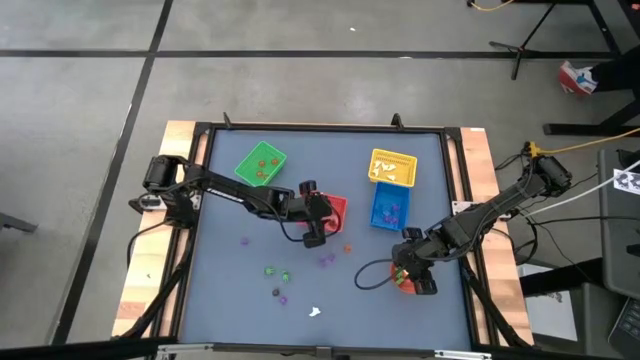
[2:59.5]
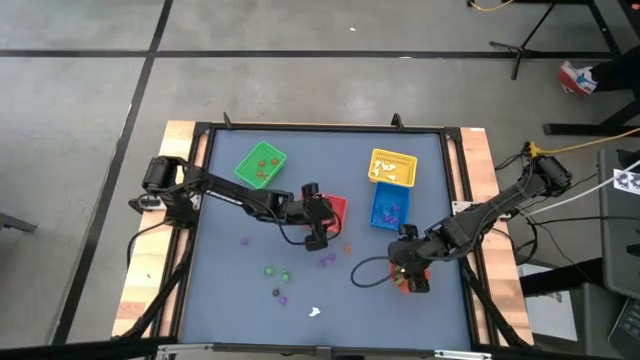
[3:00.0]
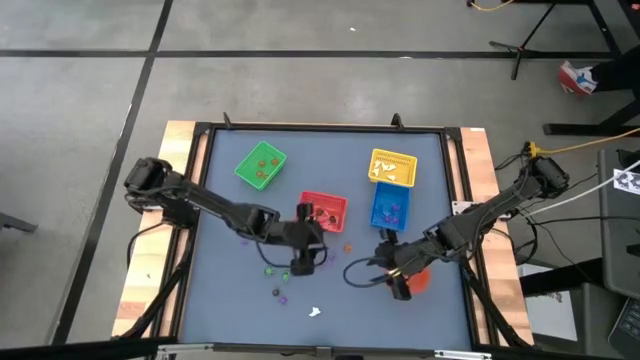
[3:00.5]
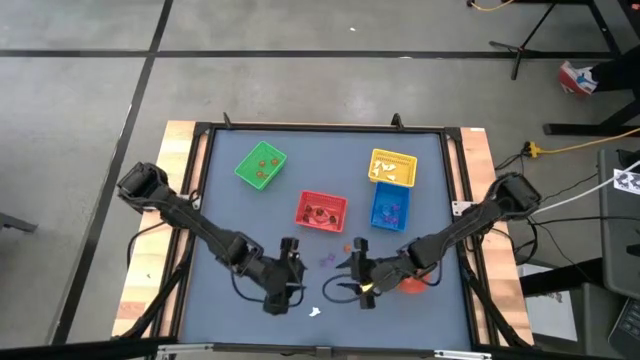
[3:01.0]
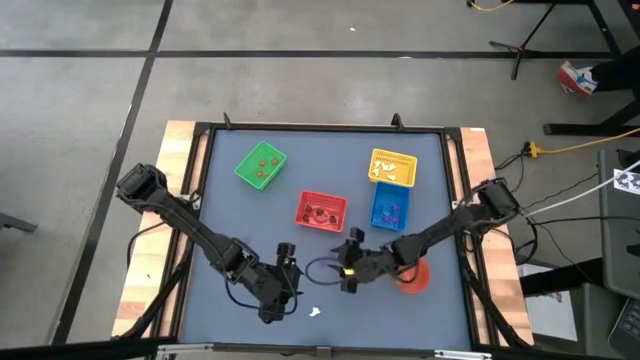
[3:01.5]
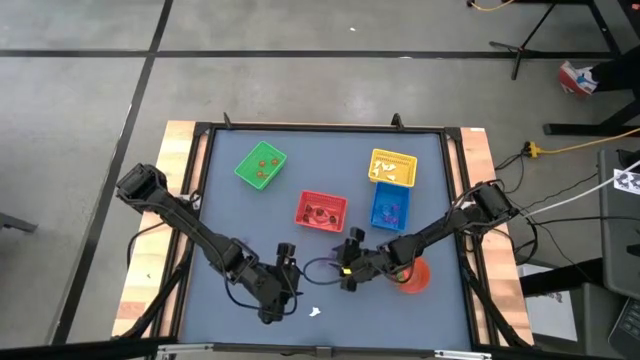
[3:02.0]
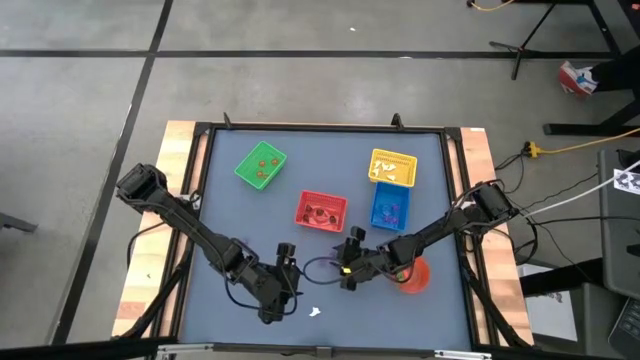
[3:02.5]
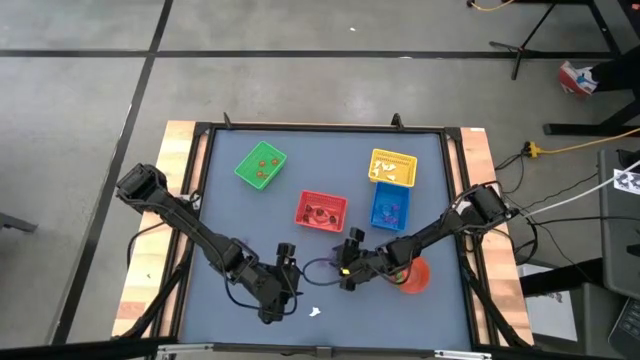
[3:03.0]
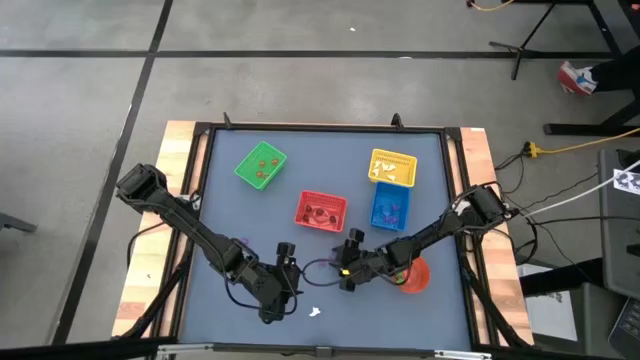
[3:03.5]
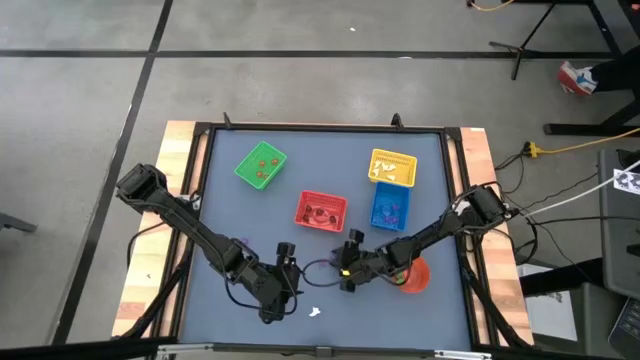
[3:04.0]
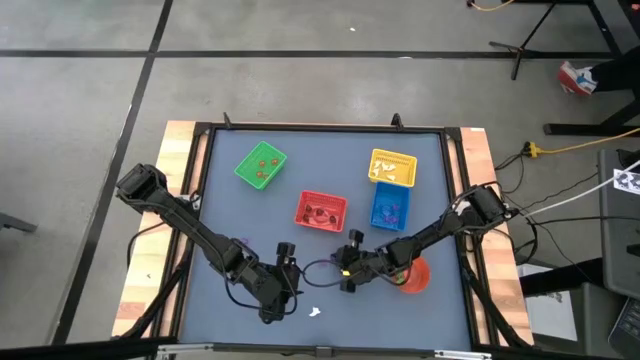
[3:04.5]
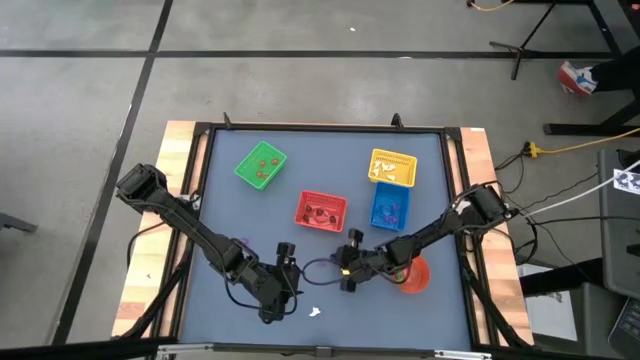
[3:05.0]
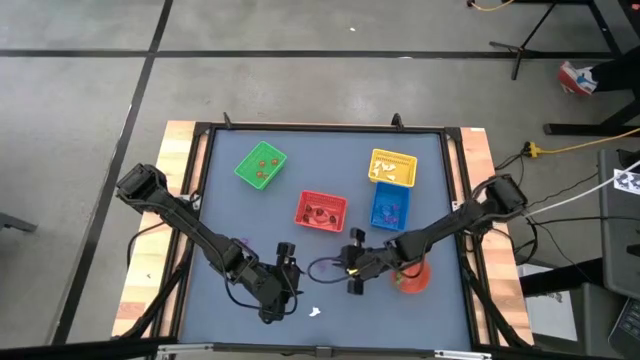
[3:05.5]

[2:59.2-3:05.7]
Task: Sort Halloween decoration
Put the violet spider toy into the blue bin

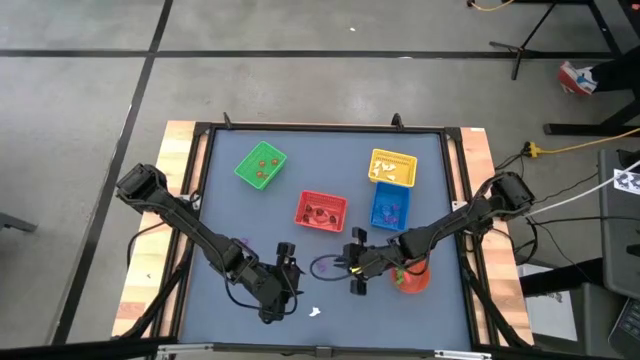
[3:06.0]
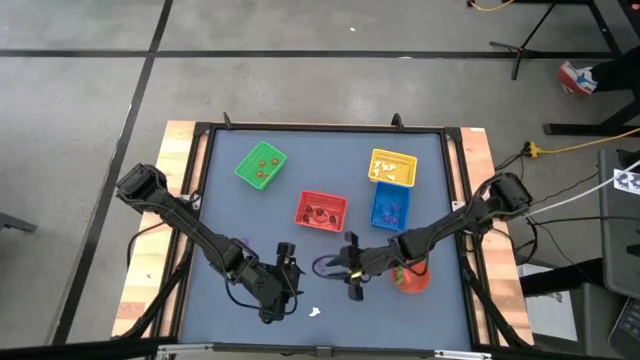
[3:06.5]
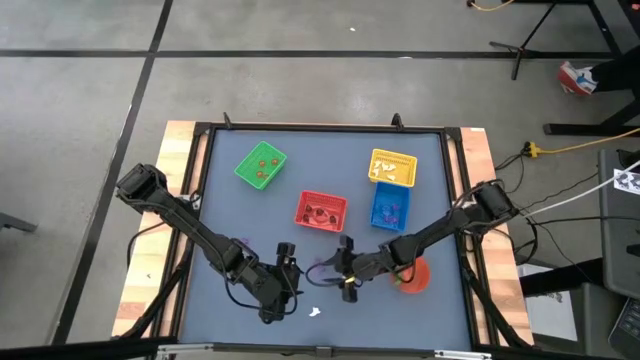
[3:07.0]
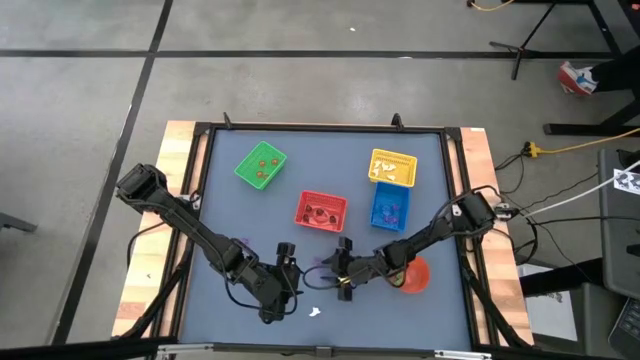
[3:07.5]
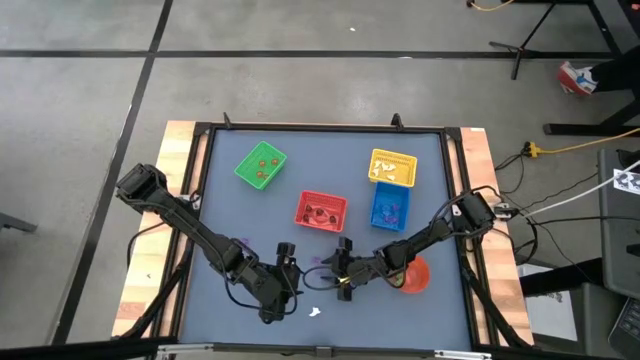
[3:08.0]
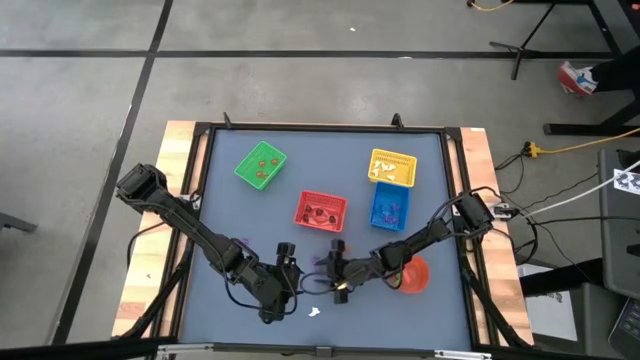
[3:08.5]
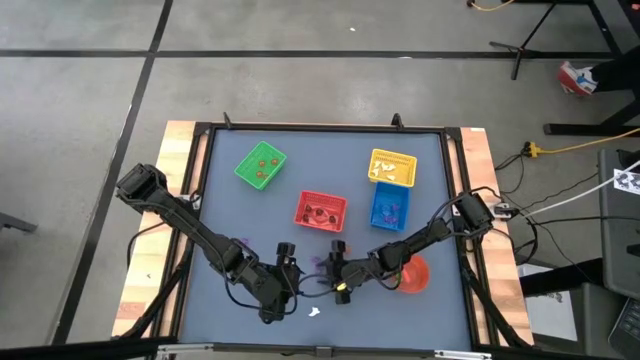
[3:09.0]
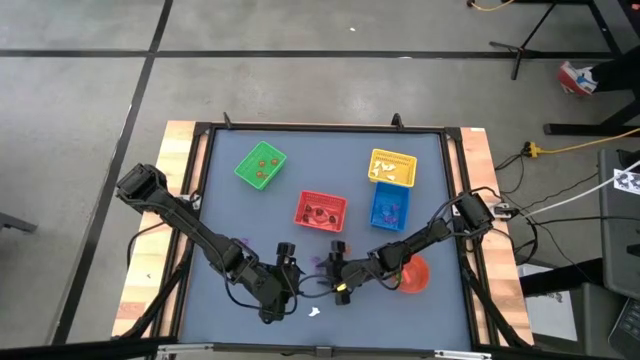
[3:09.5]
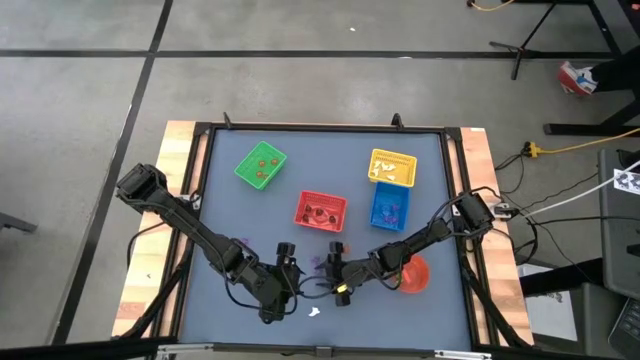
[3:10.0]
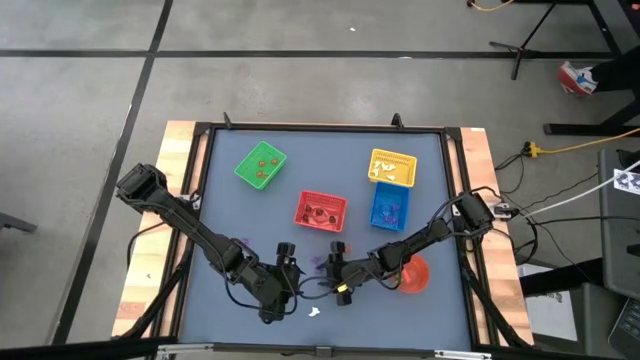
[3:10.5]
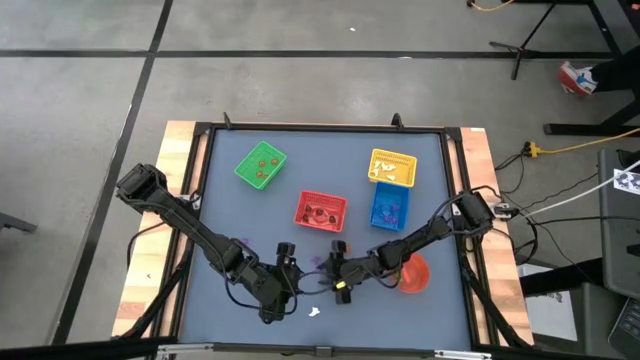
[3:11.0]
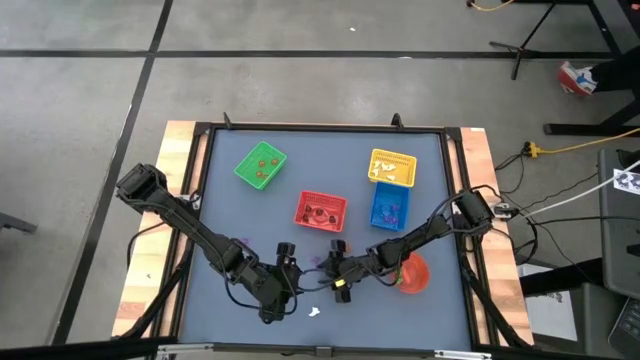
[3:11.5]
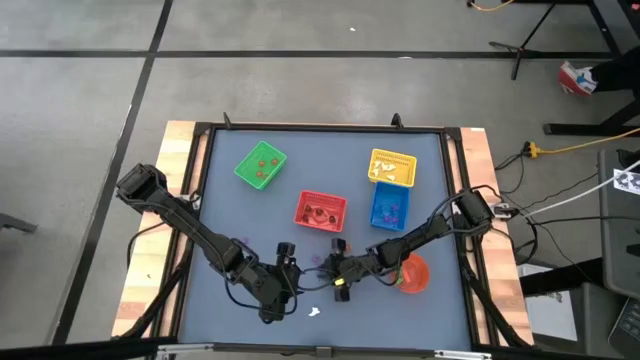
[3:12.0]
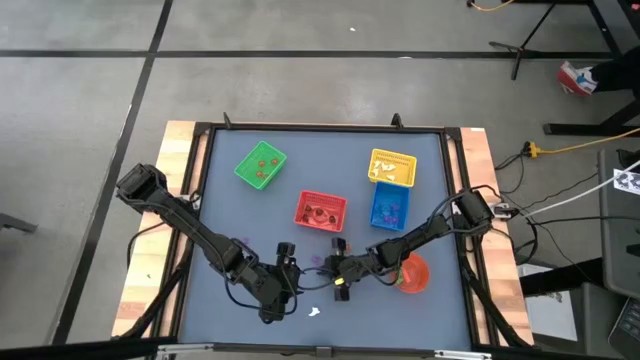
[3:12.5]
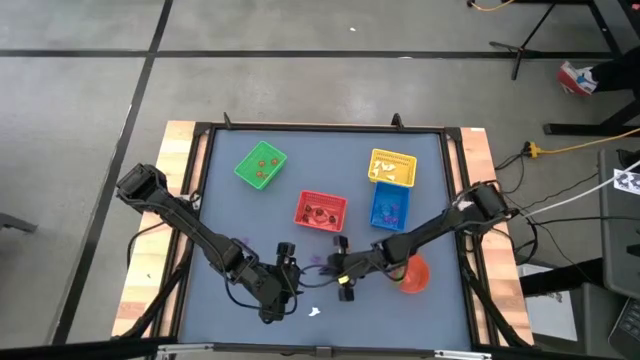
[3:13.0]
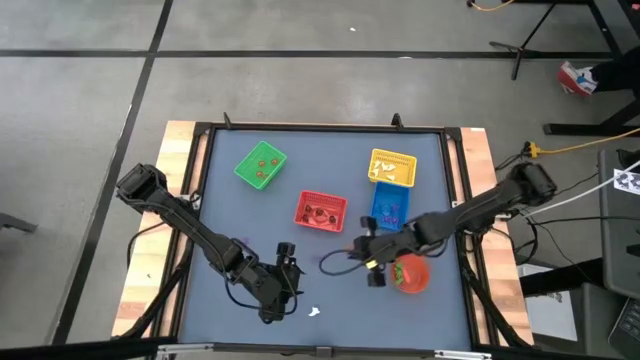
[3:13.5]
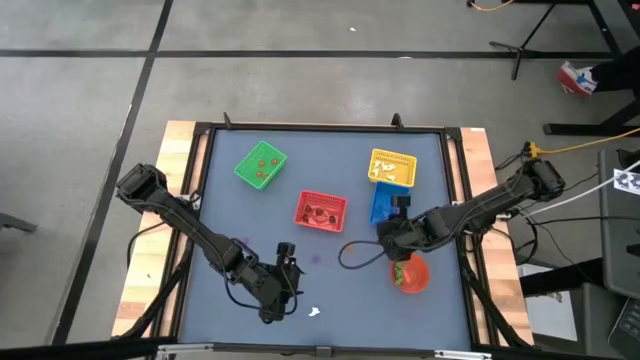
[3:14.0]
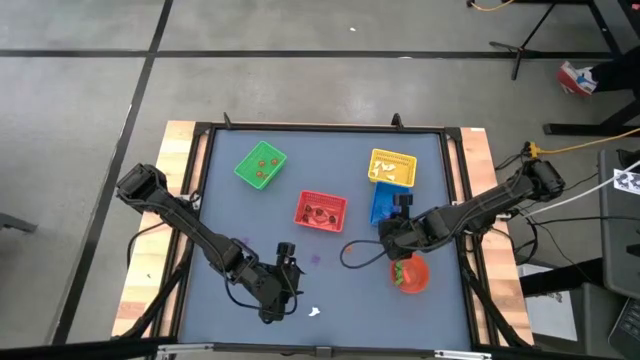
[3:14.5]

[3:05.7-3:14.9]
Put the violet spider toy into the blue bin

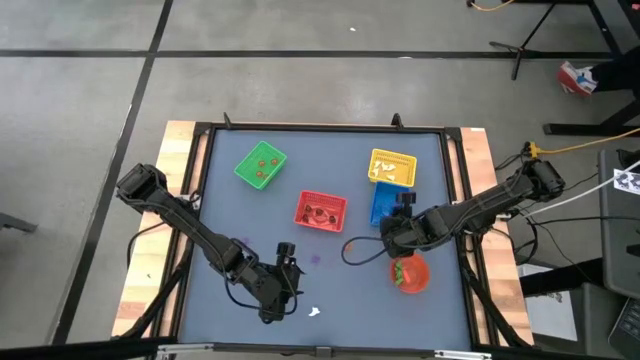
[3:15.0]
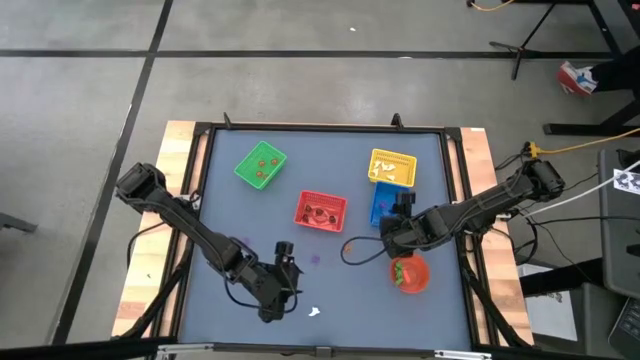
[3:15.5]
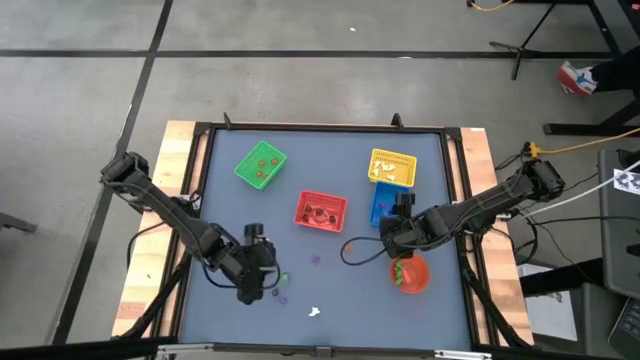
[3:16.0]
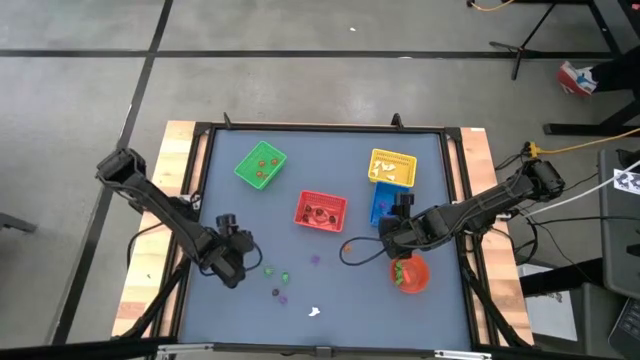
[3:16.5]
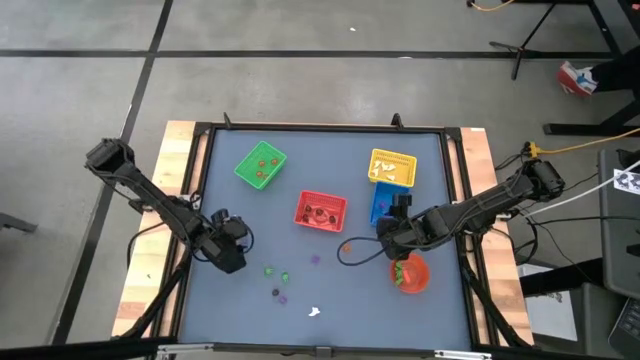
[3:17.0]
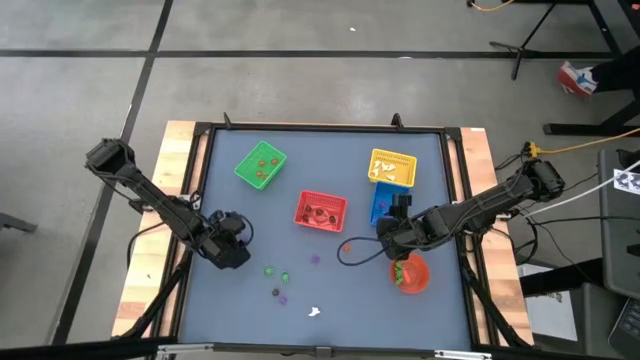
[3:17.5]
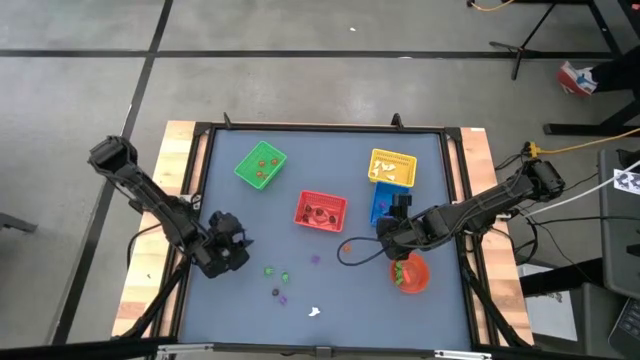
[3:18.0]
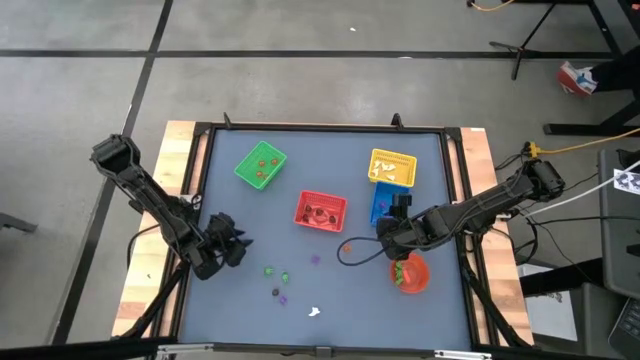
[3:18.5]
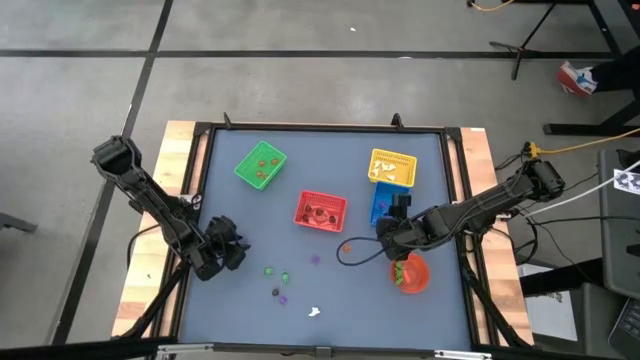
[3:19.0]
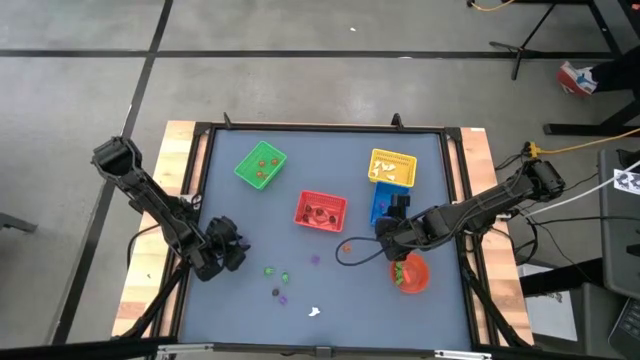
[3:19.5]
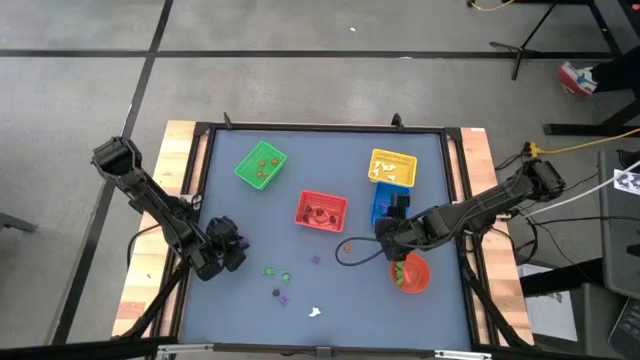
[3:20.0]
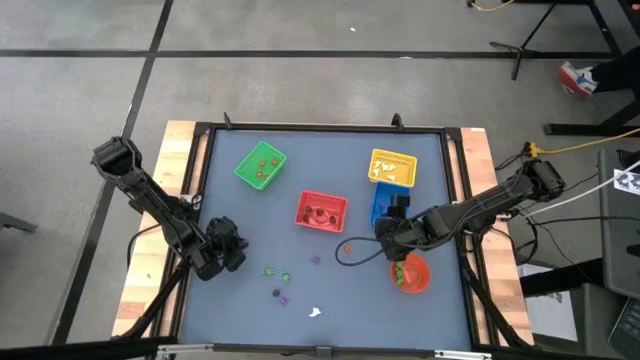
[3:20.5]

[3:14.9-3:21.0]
Put the violet spider toy into the blue bin
